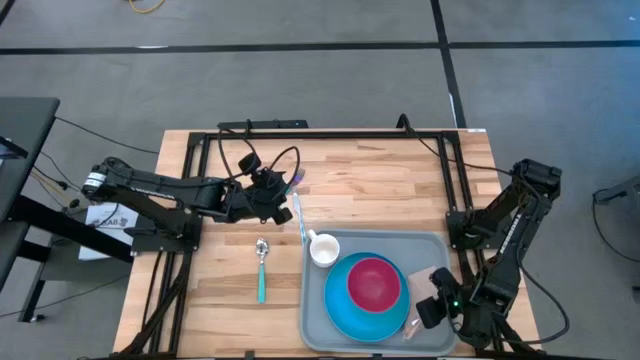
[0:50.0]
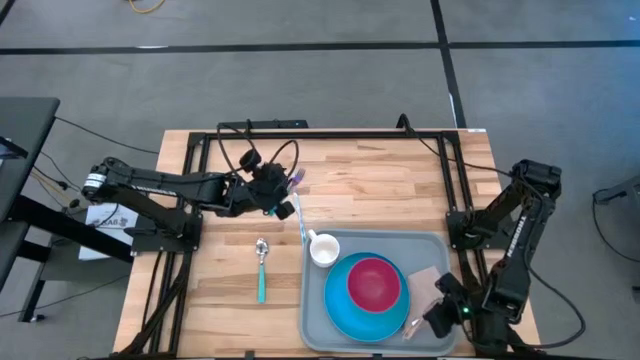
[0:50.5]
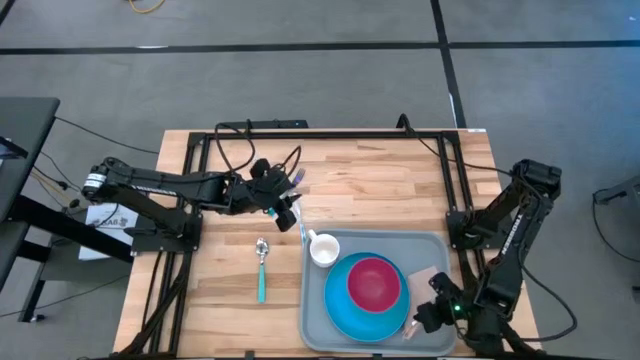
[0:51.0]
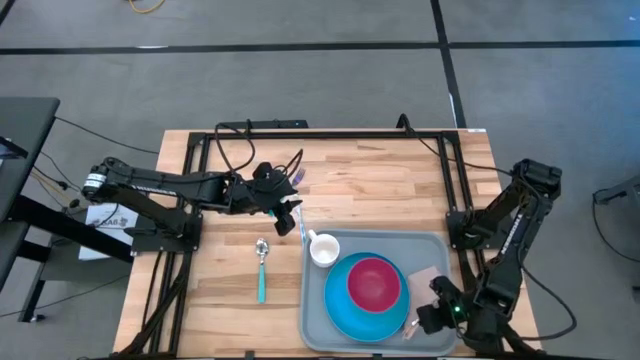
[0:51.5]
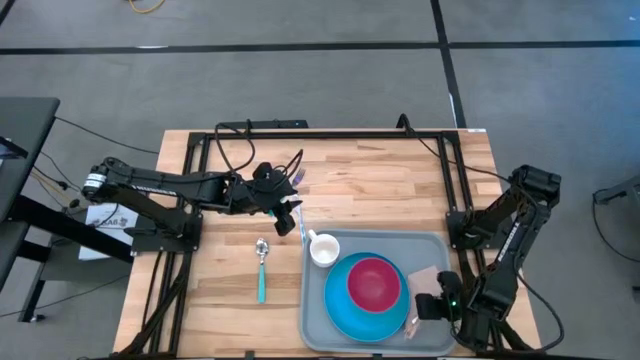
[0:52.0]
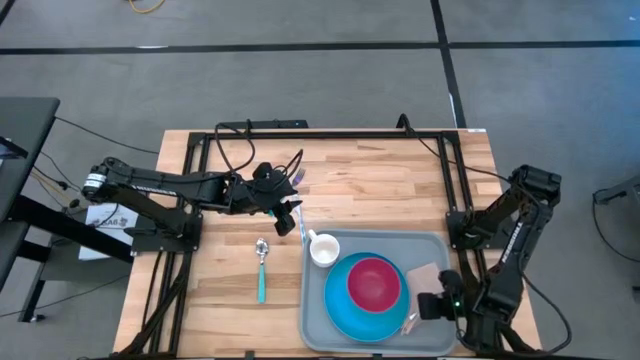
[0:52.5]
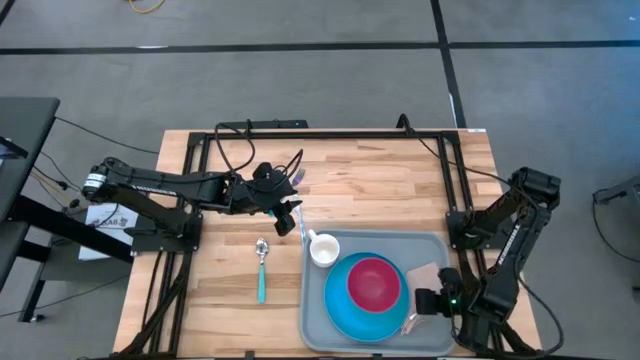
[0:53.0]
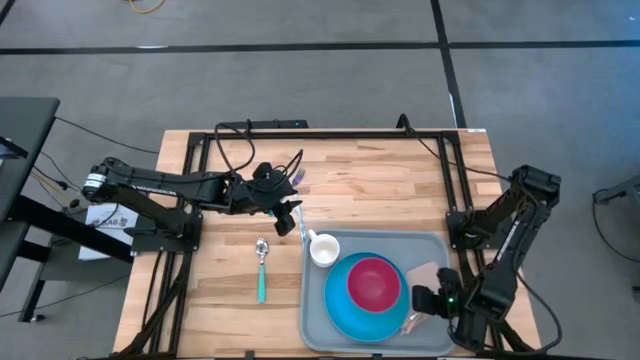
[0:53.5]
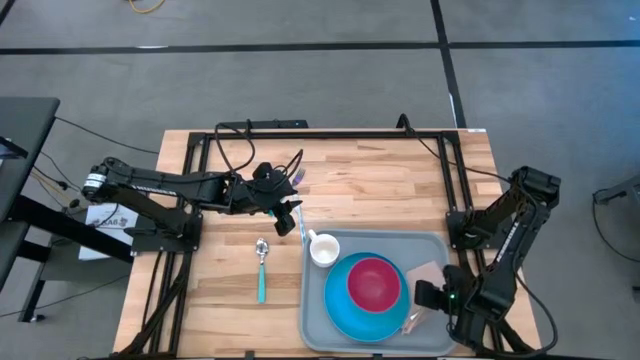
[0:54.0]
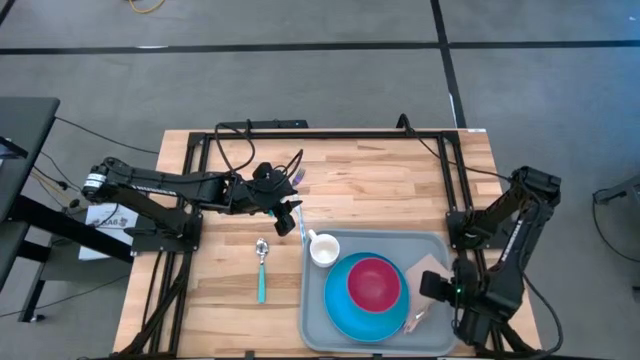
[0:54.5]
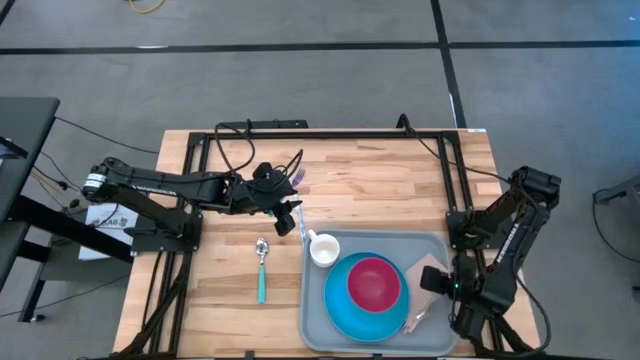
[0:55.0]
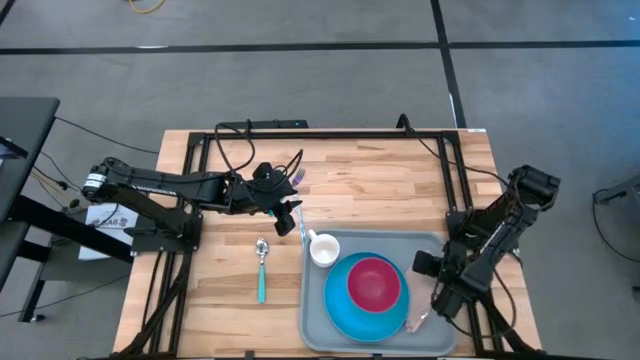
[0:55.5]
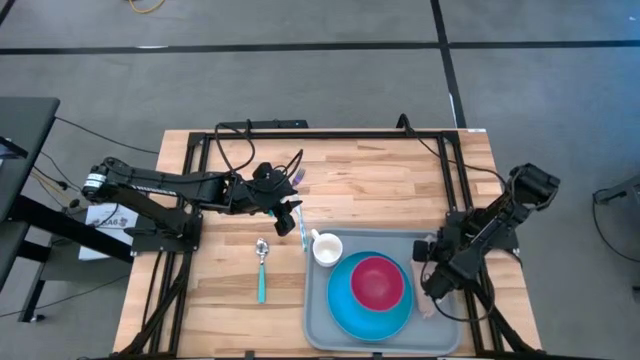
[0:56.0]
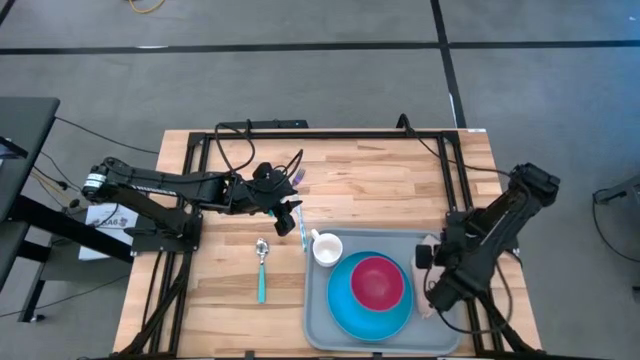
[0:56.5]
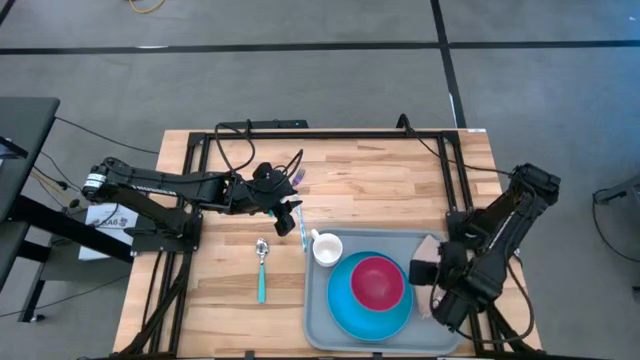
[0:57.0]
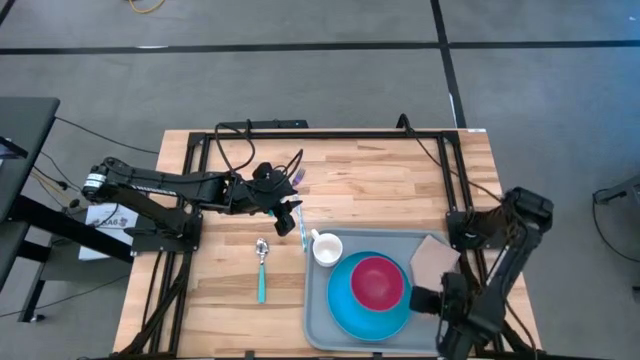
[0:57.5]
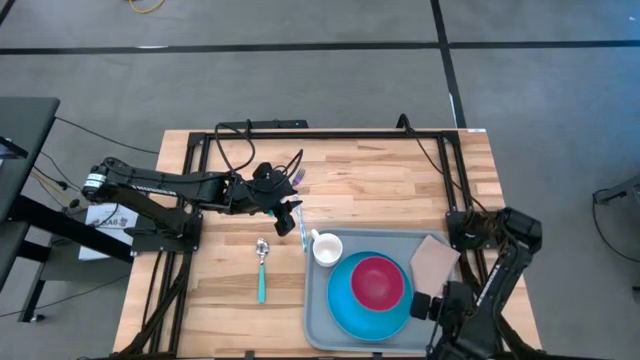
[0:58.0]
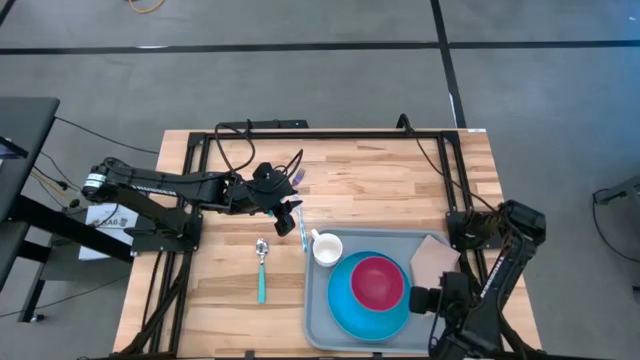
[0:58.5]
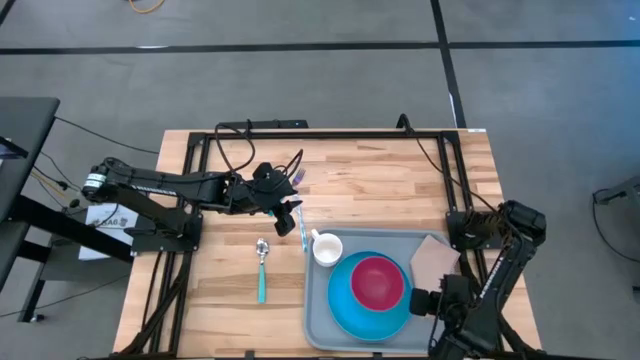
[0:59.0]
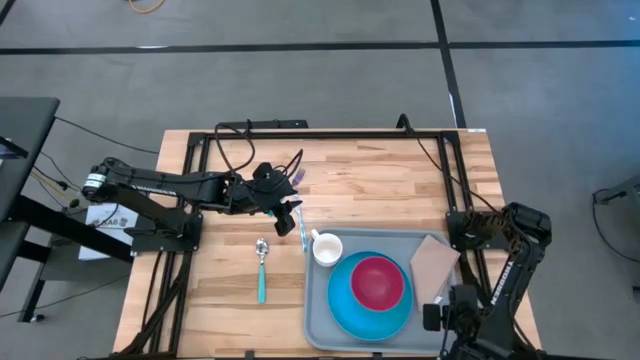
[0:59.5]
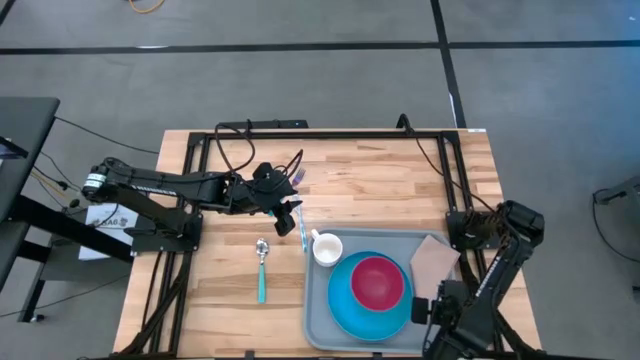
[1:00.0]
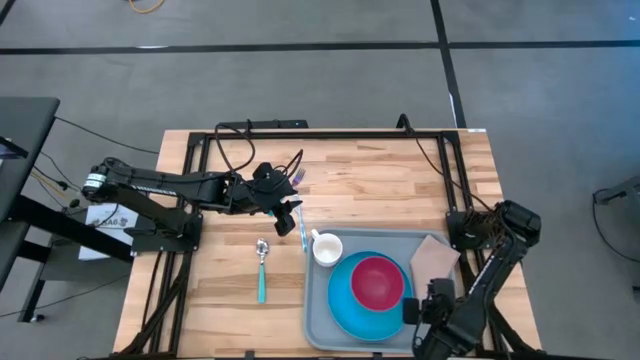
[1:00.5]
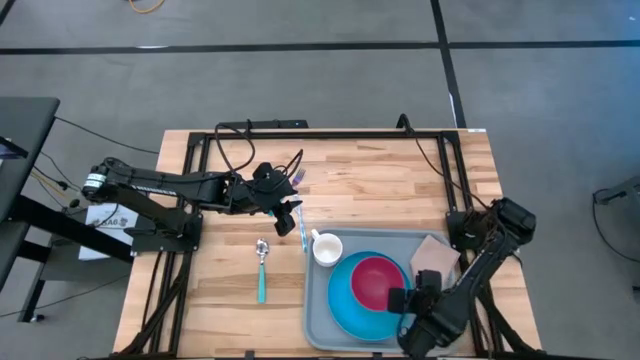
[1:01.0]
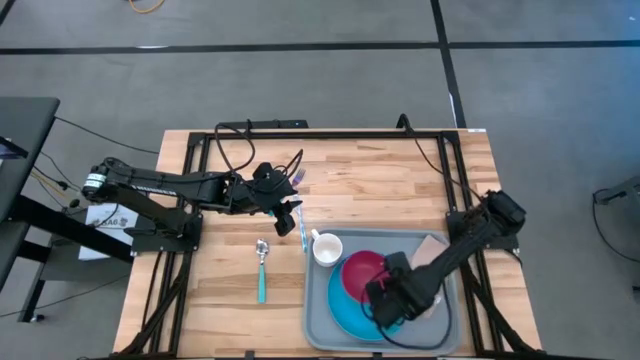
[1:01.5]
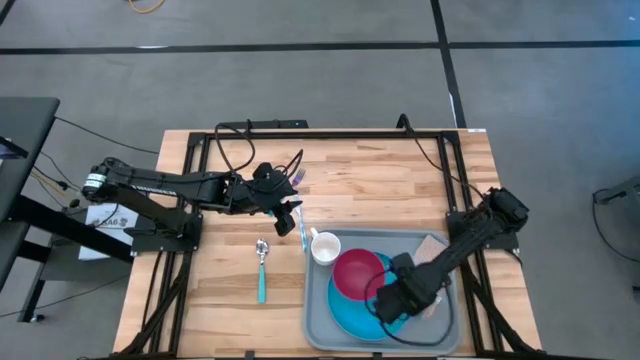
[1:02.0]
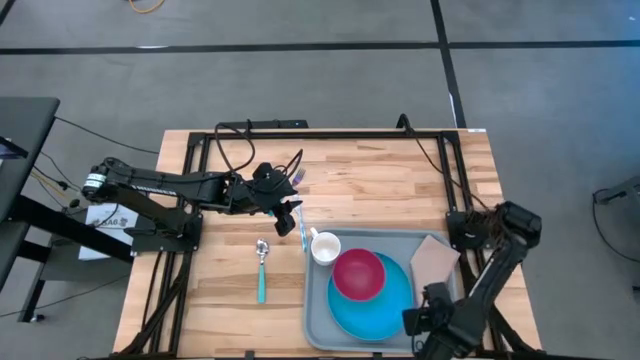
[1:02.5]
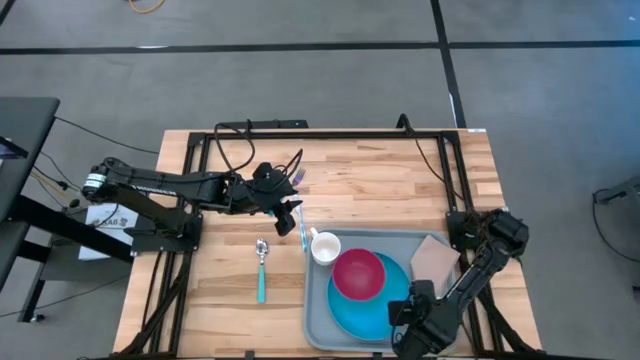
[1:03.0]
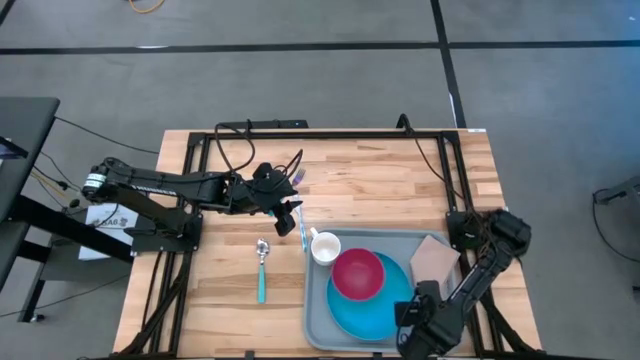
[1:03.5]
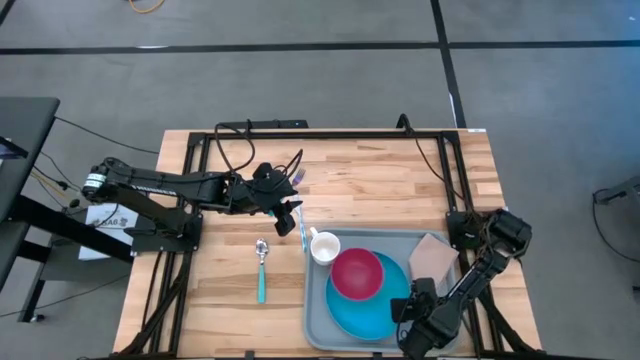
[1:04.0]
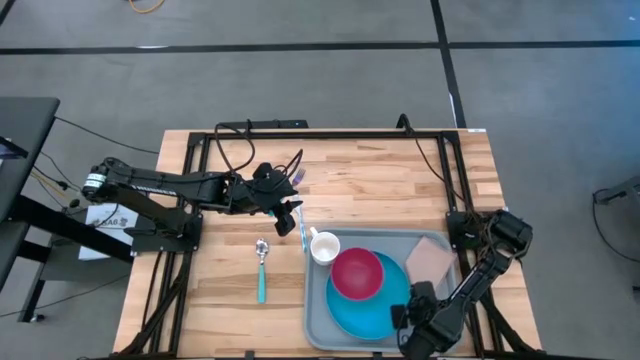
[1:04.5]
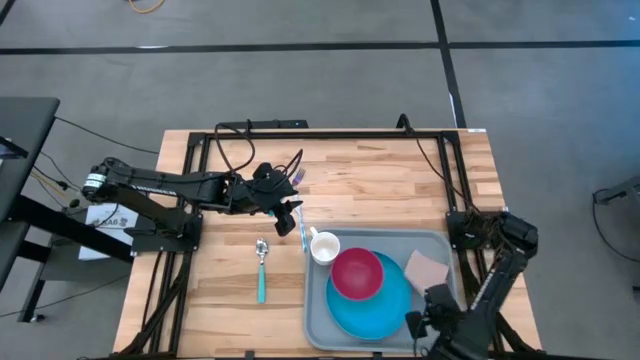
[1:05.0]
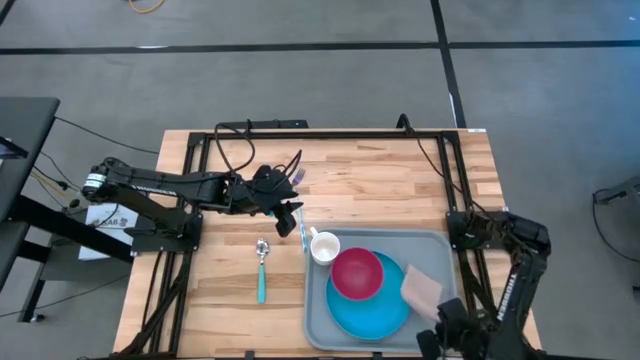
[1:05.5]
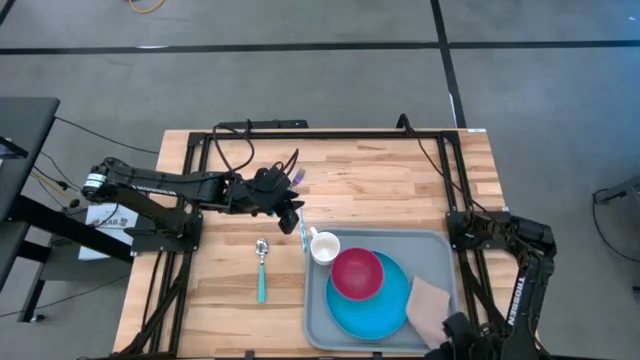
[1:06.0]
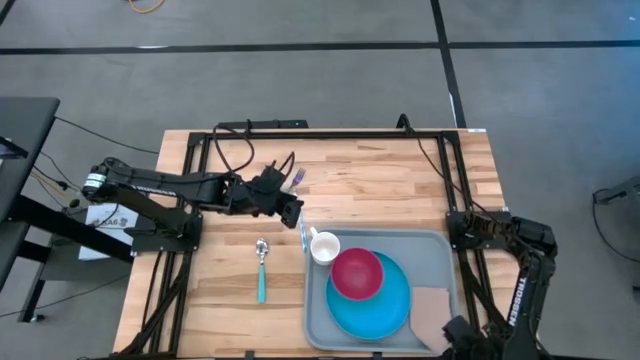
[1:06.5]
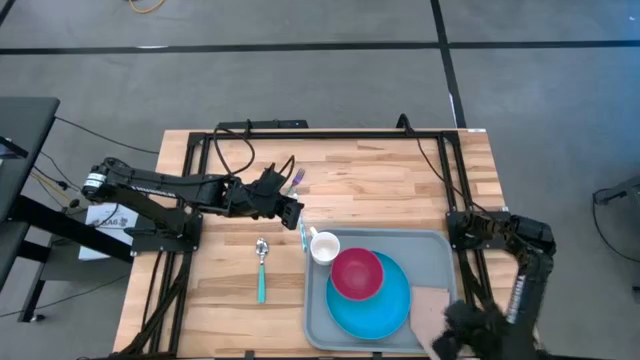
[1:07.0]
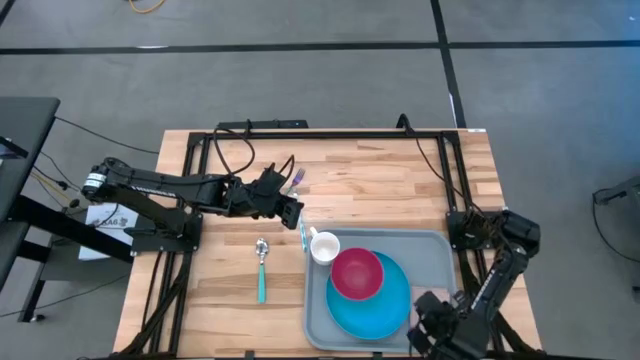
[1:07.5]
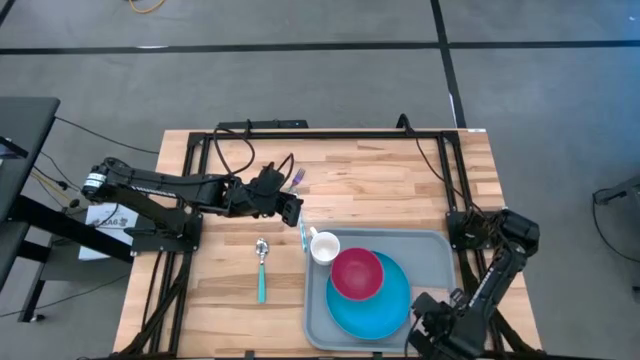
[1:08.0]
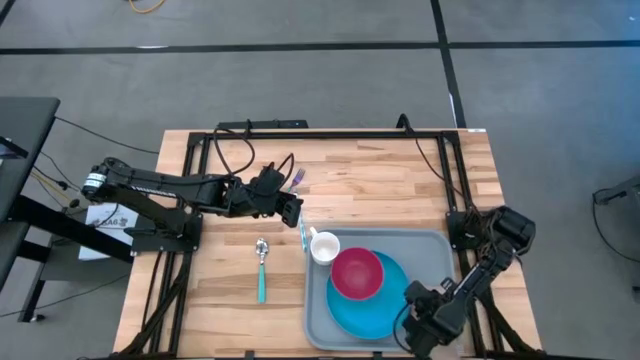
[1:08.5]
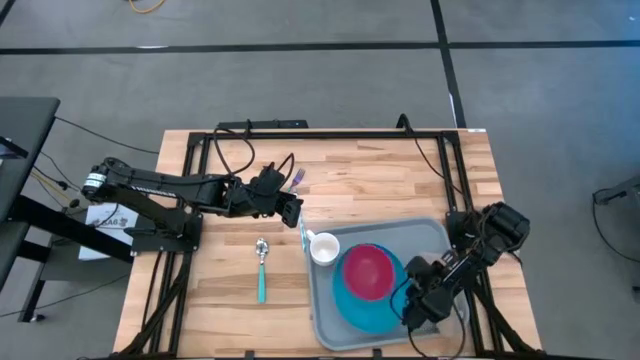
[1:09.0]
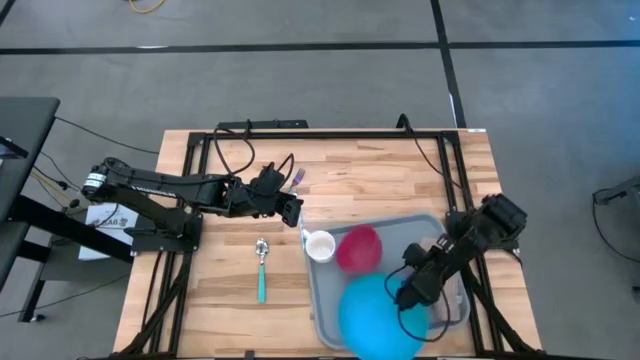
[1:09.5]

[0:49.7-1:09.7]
Task: Set up tray
Put the brown napkin on the gray tray

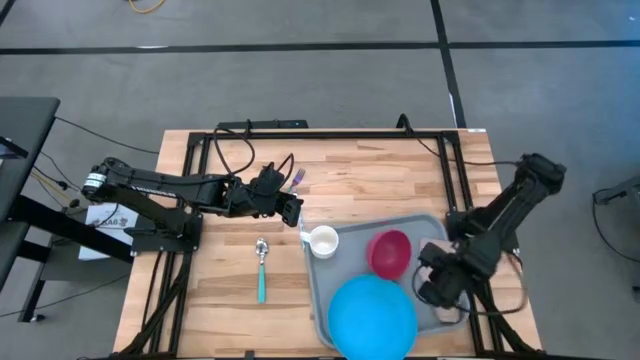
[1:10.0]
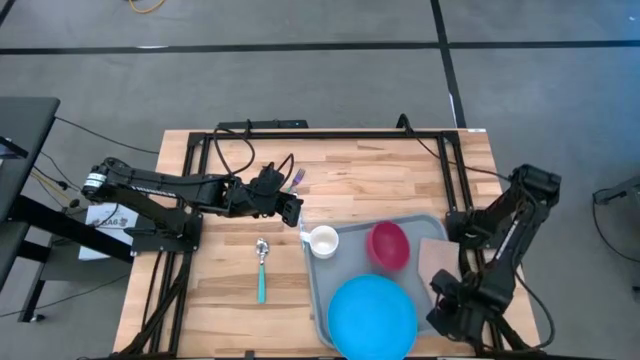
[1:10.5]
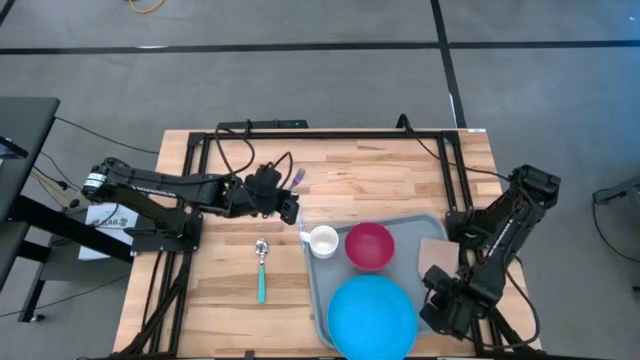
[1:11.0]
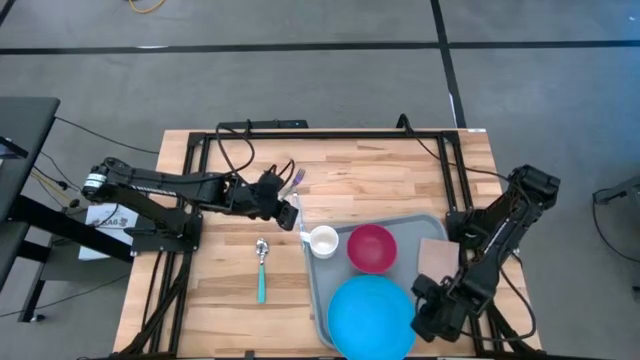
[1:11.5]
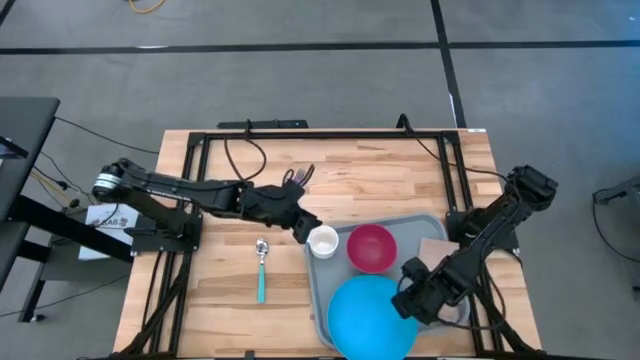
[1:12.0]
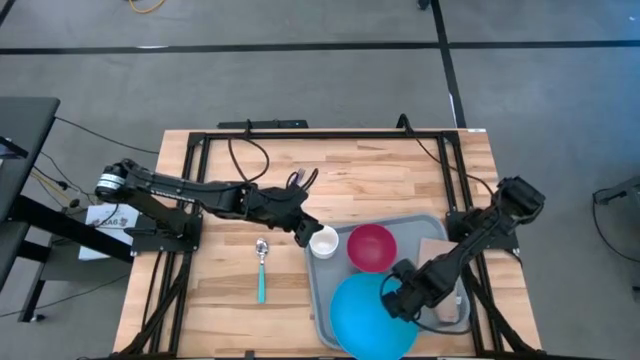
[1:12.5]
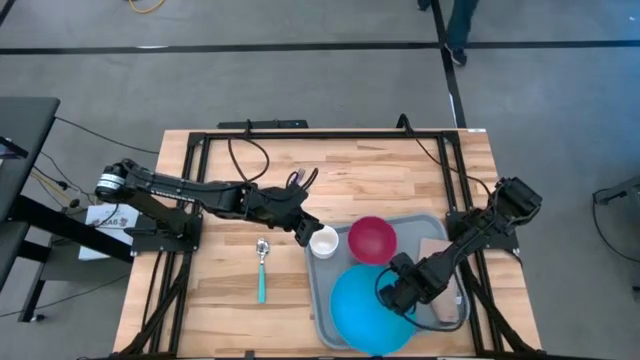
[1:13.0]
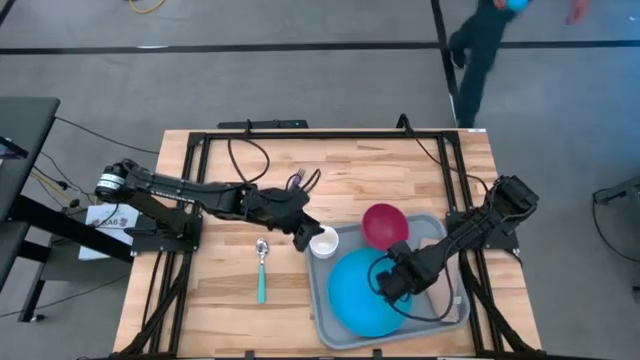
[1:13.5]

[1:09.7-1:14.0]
Adjust the blue plate on the tray
